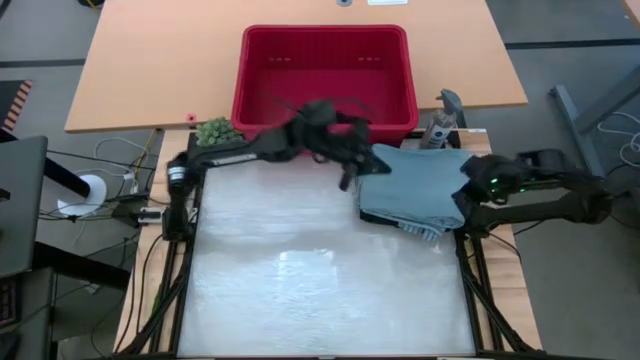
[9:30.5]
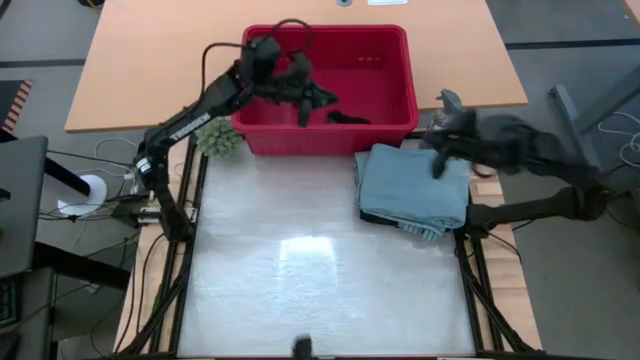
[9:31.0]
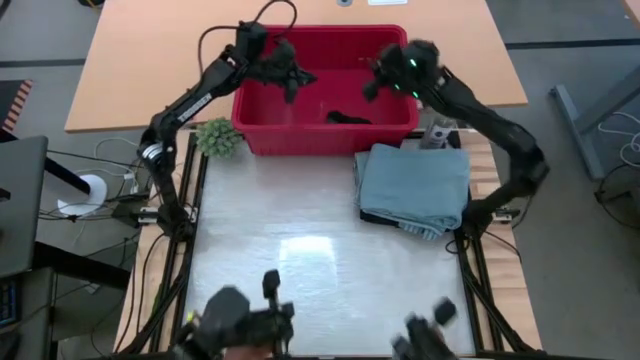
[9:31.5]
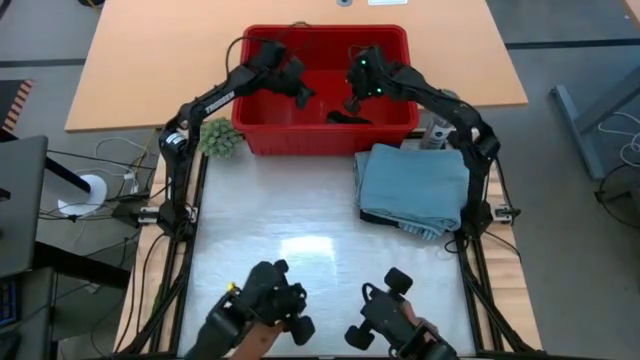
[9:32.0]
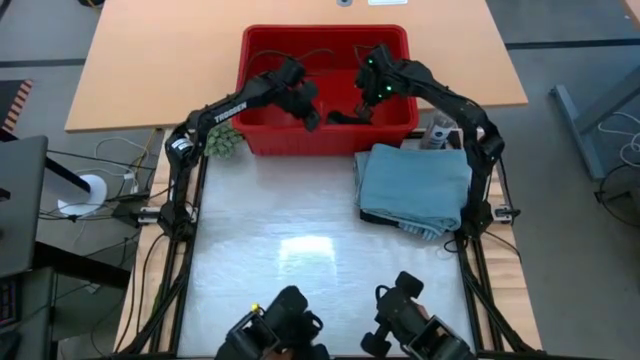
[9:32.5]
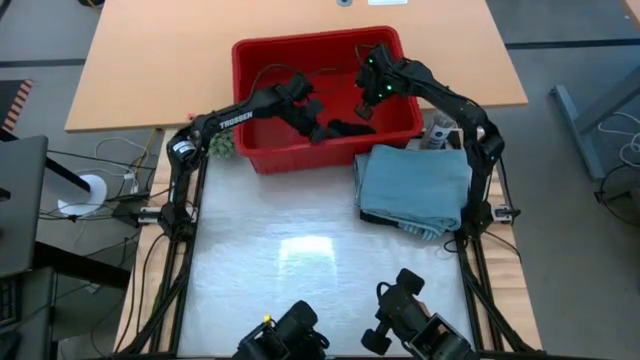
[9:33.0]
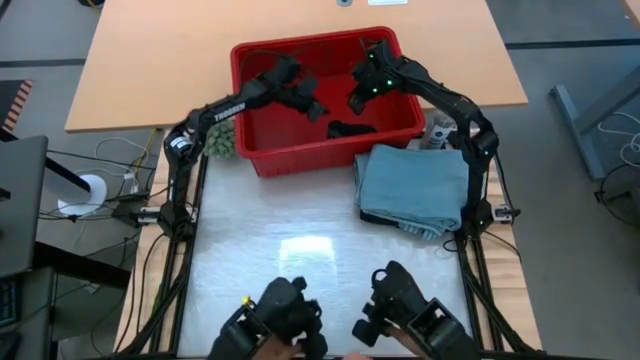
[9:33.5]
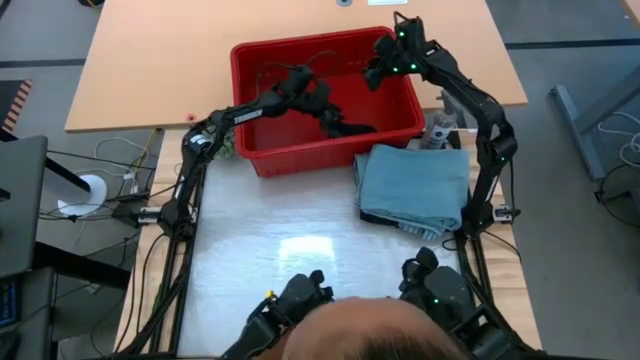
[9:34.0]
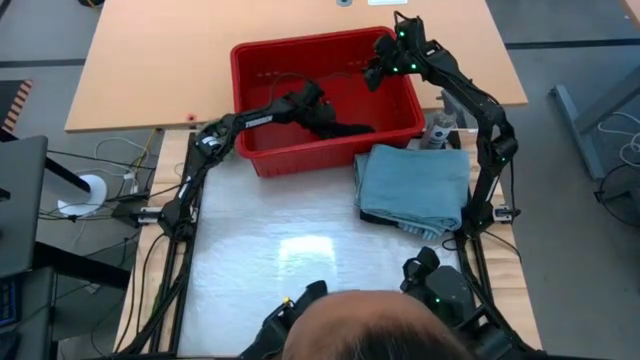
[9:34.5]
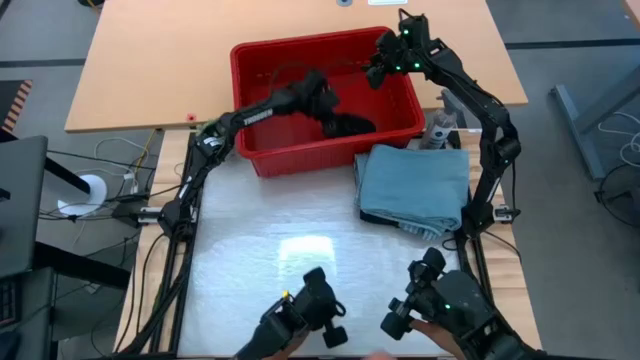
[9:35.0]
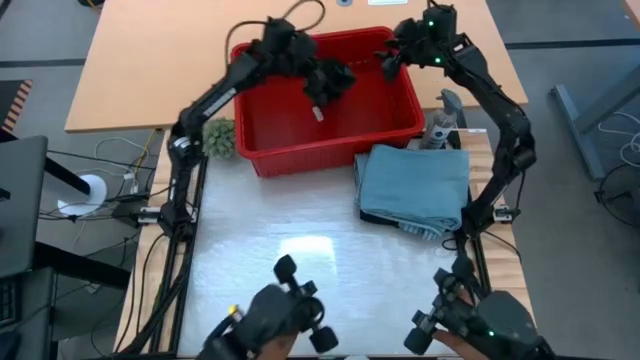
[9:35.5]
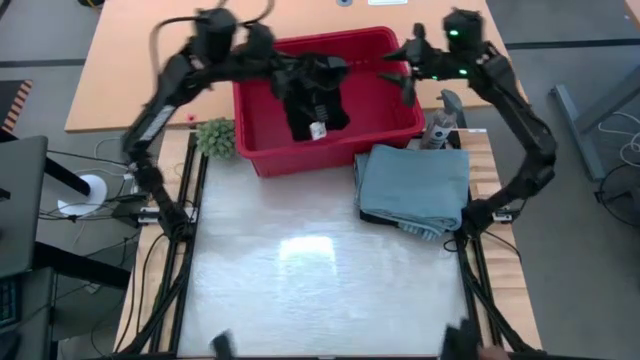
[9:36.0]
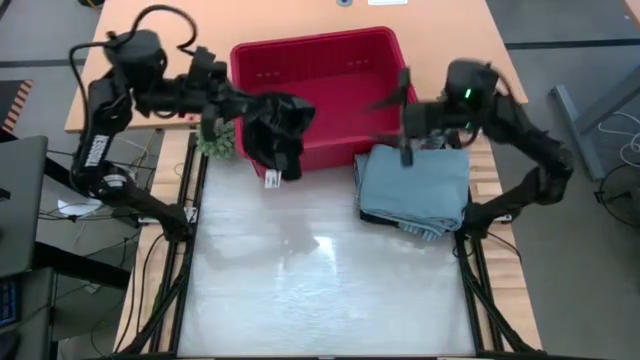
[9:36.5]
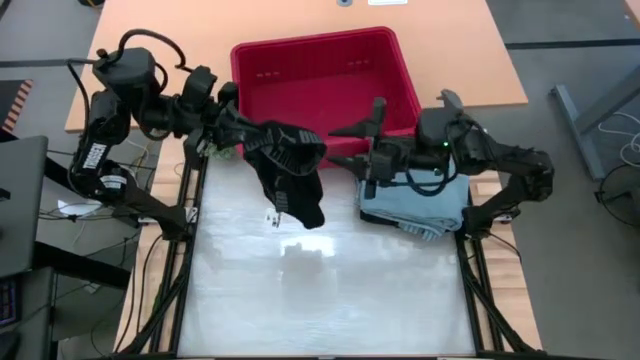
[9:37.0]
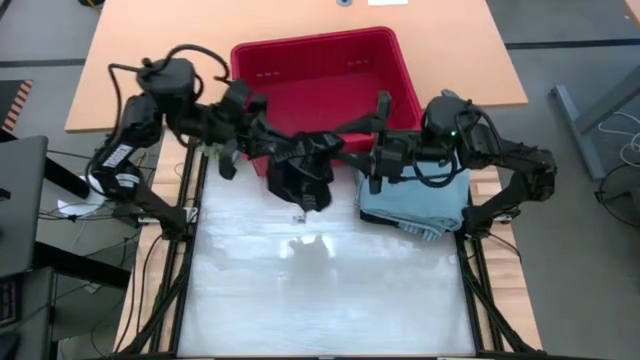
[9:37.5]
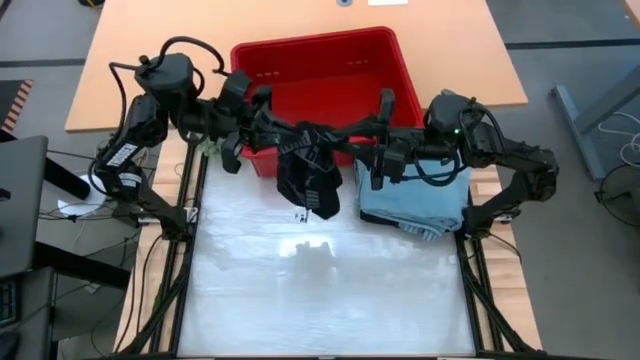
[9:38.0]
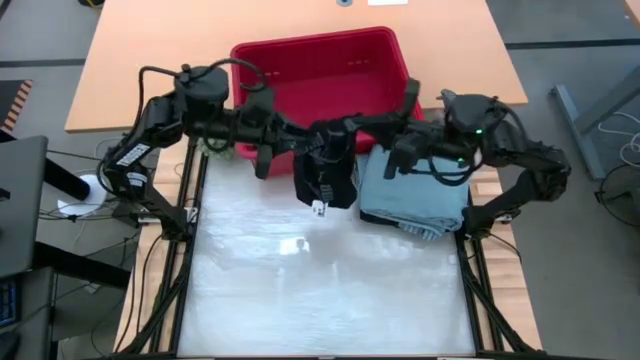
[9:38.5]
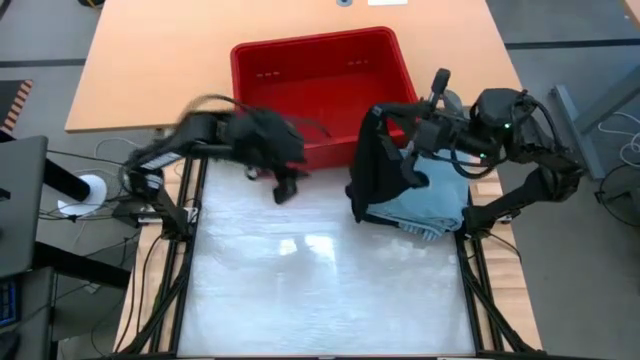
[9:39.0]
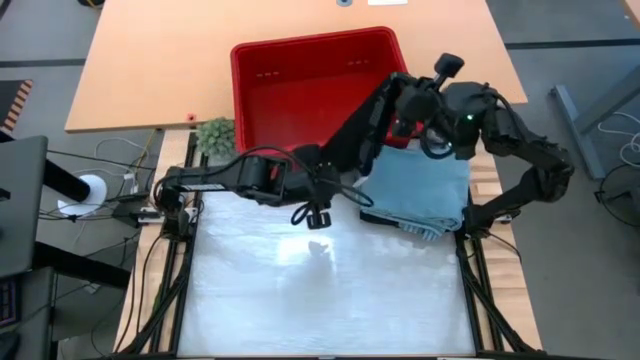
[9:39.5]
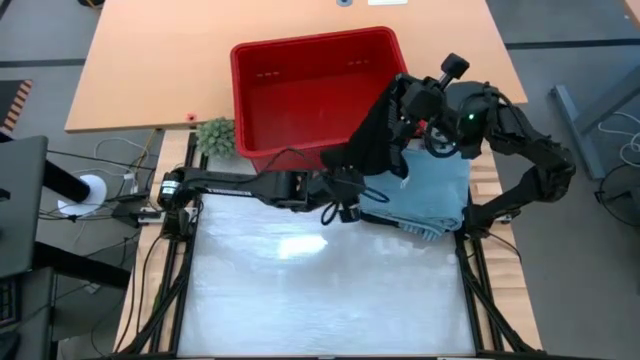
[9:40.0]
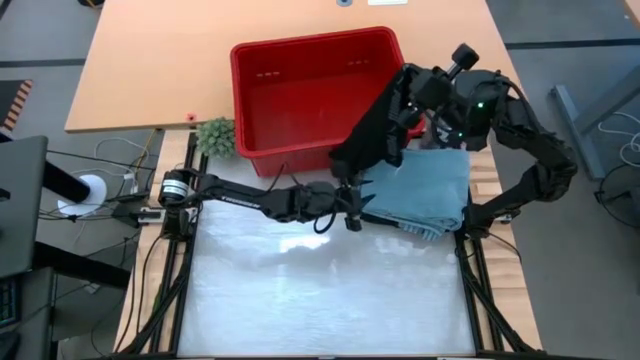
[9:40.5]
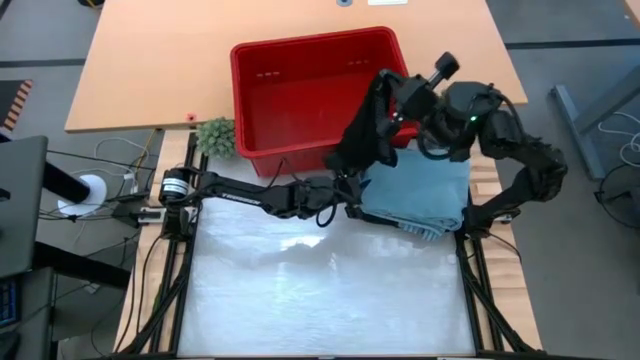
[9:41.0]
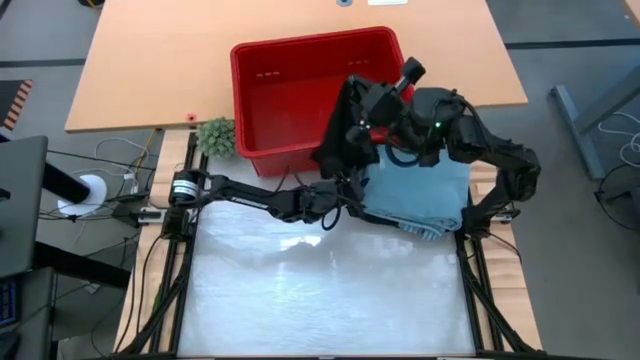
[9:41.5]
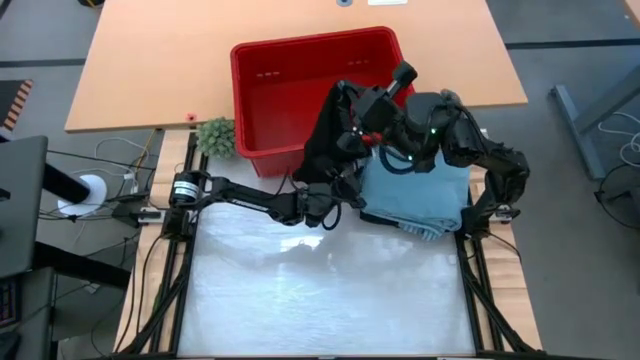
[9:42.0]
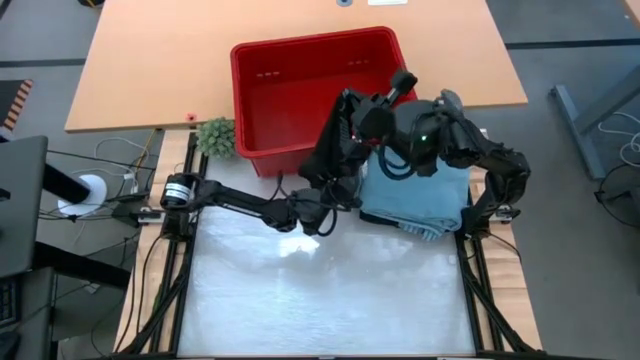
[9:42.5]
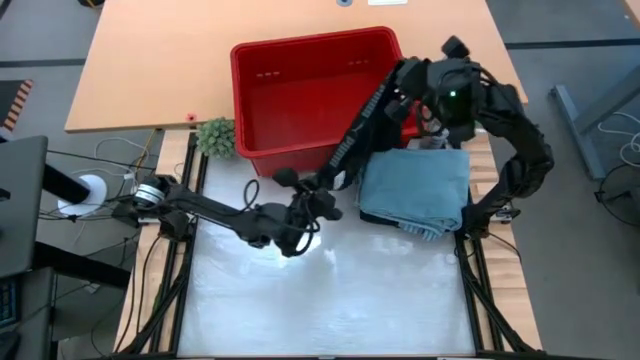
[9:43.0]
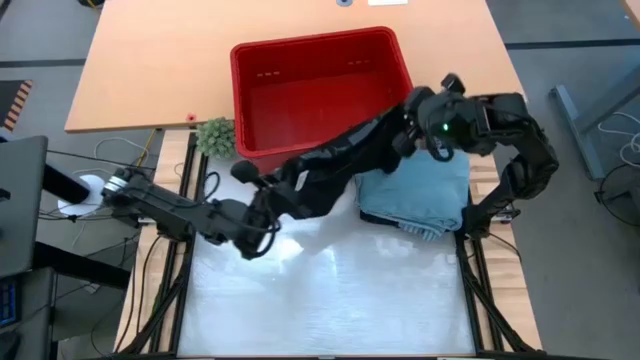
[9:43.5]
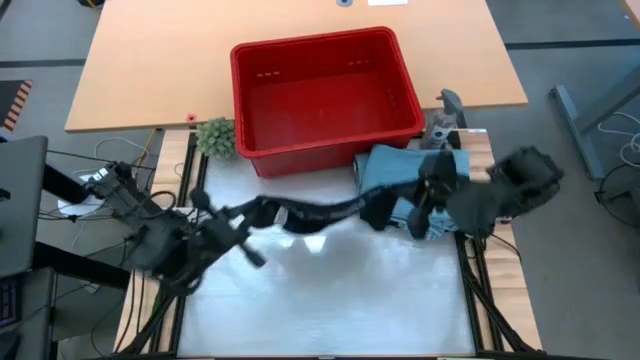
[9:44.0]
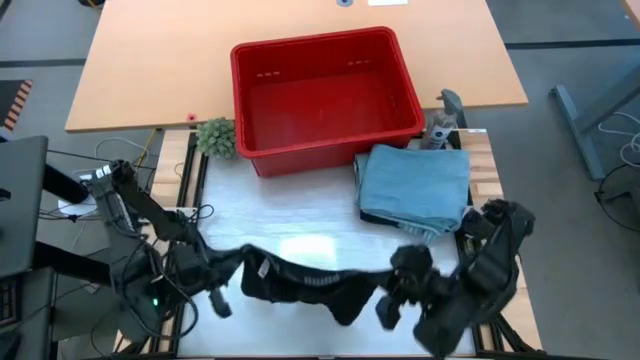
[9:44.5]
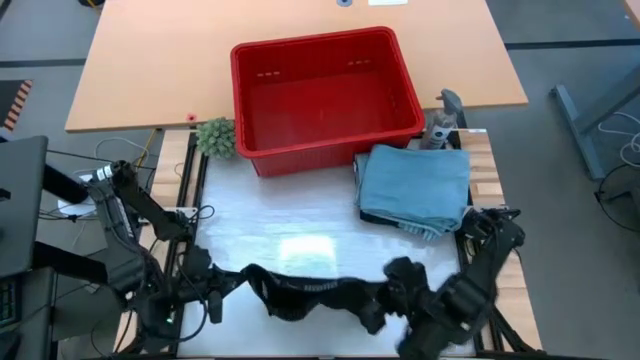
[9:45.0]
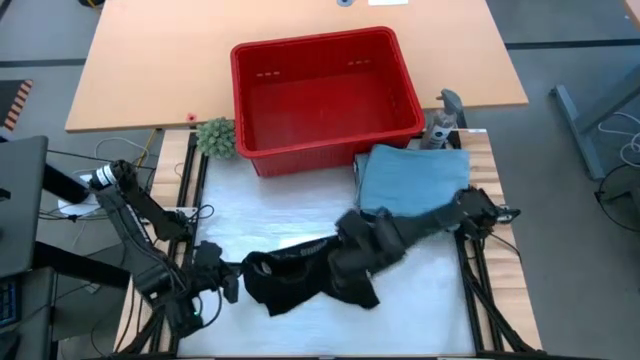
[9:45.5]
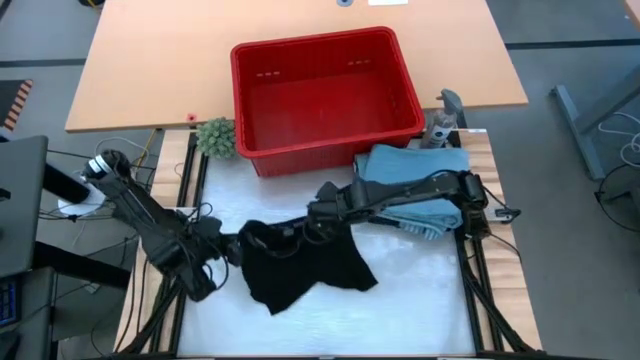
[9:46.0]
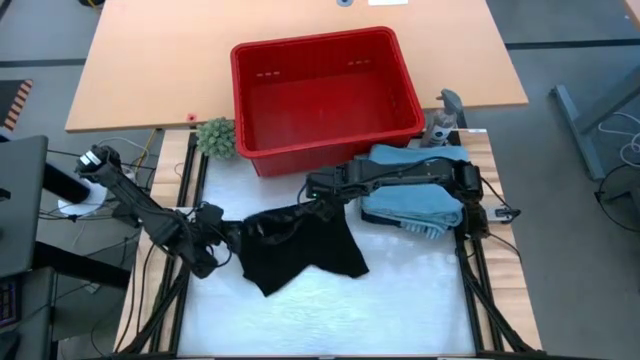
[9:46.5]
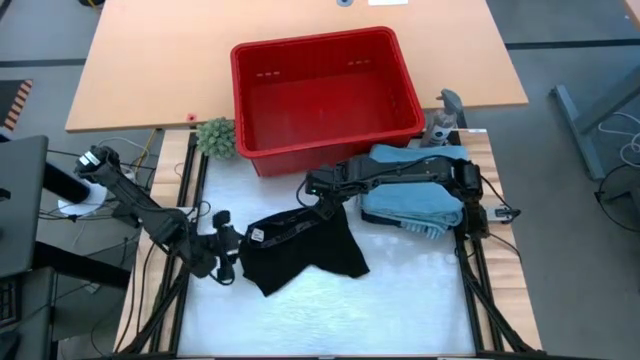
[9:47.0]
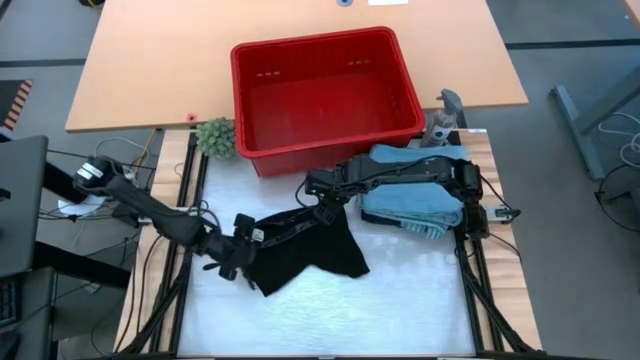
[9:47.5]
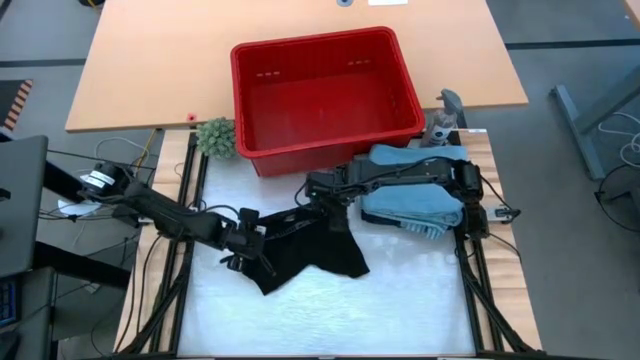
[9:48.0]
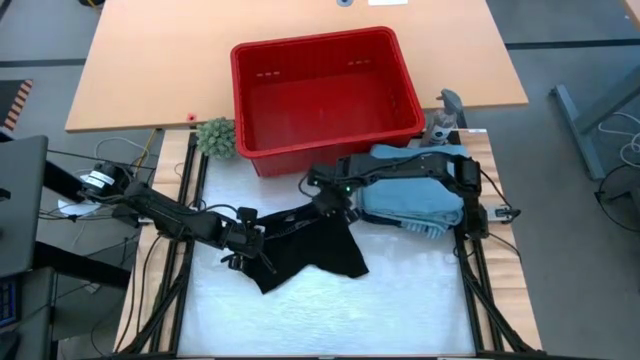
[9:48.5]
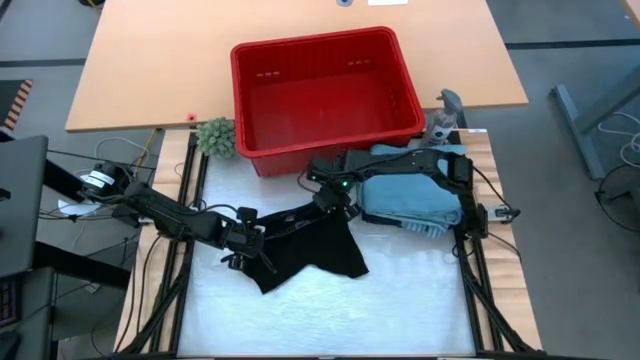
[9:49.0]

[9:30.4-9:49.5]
Task: Fold Laundry from Bin
Fold the black boxer short

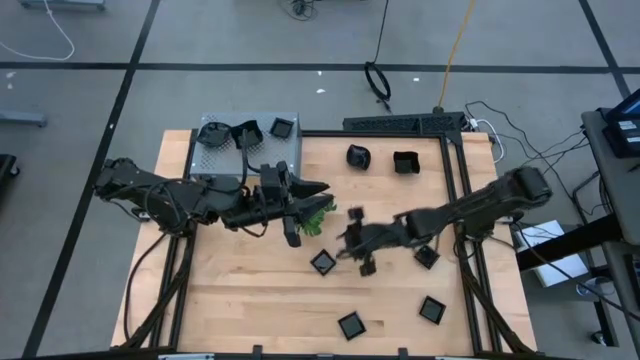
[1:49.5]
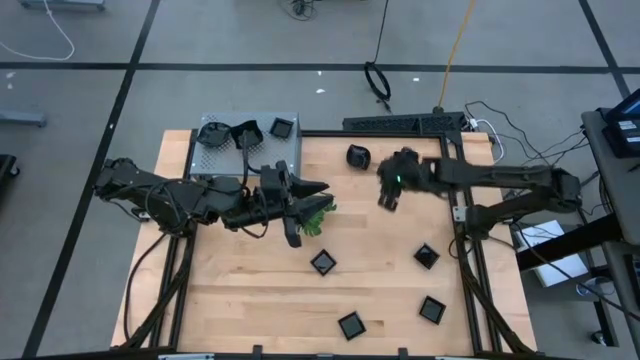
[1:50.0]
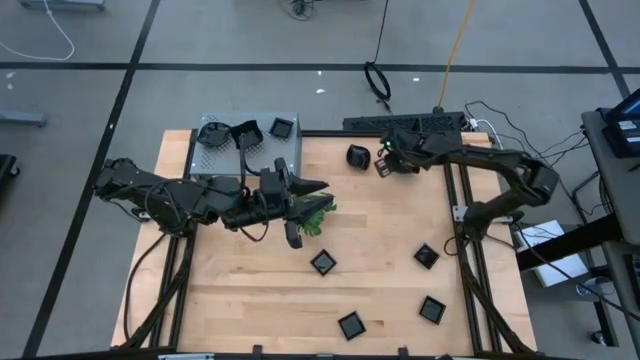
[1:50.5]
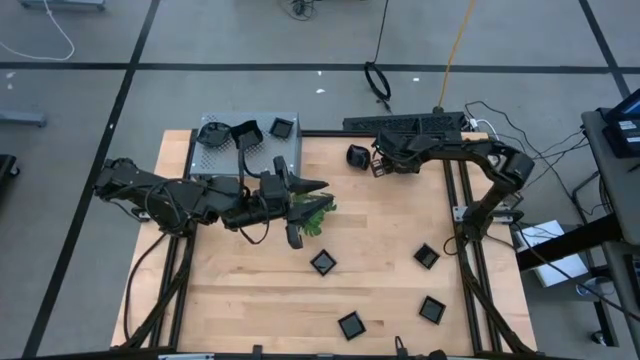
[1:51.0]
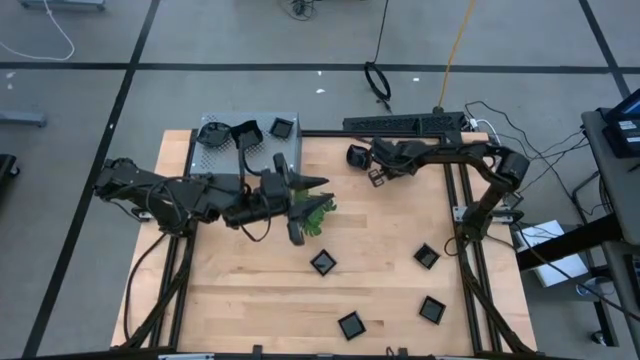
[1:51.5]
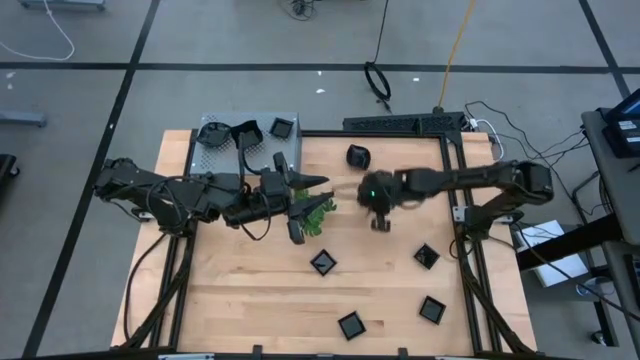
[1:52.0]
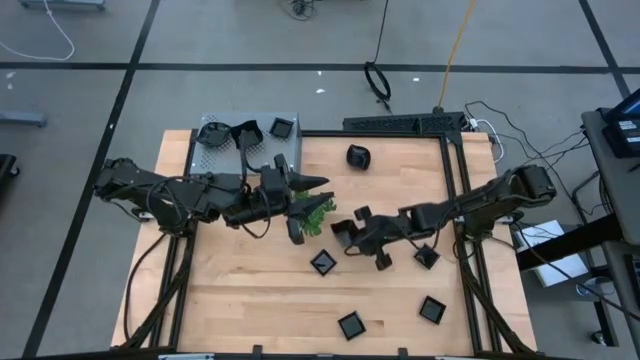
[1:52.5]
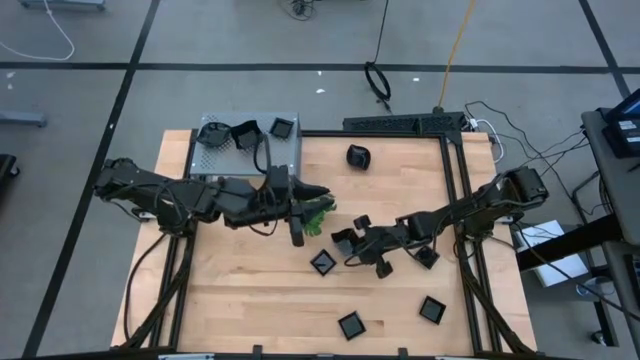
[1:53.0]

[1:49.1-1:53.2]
Task: Pick & Place Mini shaped plates
Move the distorted square plate to the center of the table
